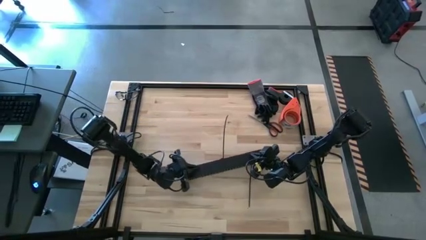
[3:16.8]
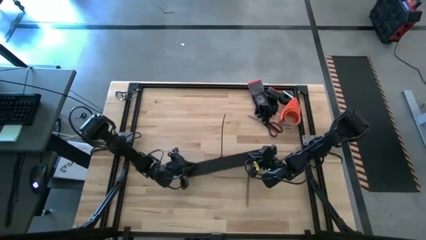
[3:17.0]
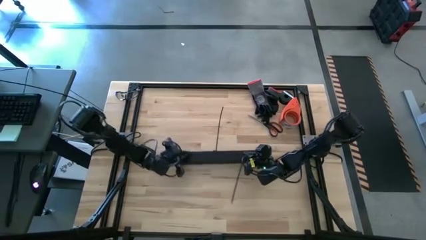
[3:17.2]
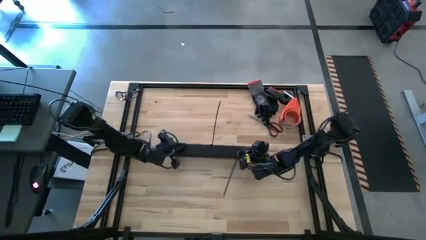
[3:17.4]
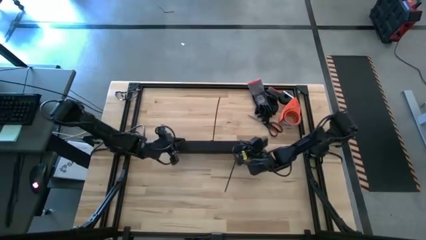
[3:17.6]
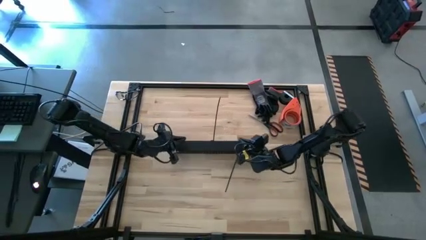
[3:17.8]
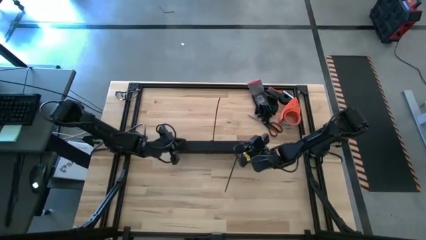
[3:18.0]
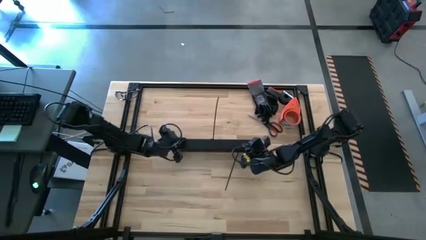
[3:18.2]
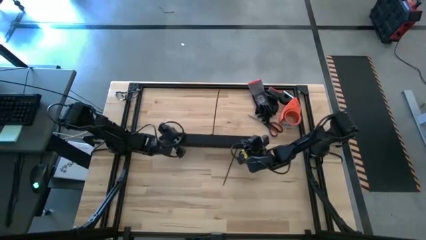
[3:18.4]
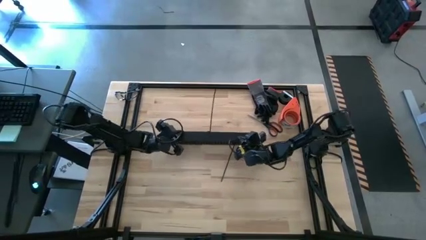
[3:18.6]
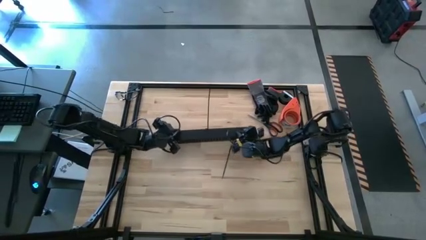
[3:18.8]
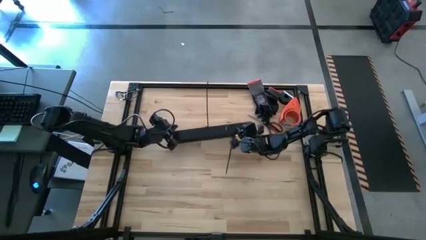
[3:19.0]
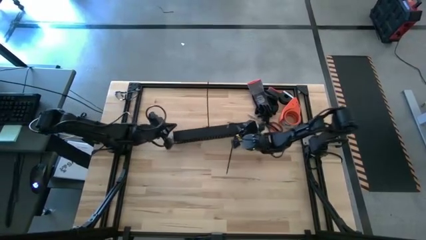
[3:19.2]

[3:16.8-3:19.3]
Task: Ziptie cables
Move the black cable duct to the top center of the table

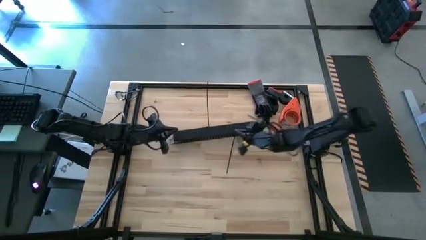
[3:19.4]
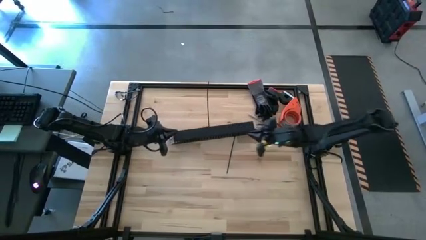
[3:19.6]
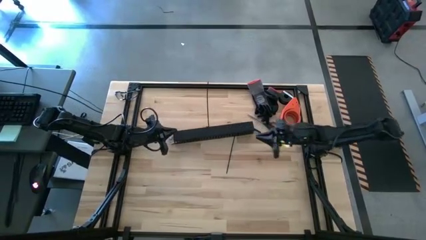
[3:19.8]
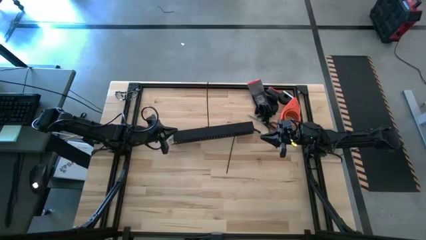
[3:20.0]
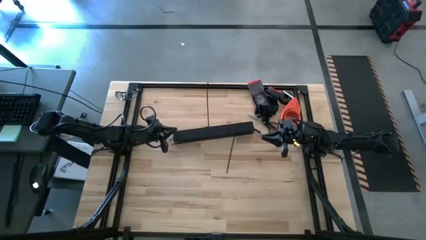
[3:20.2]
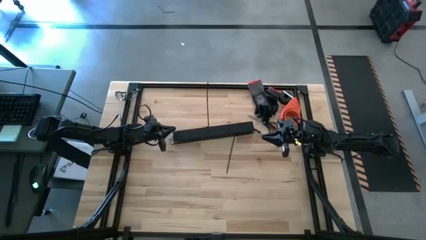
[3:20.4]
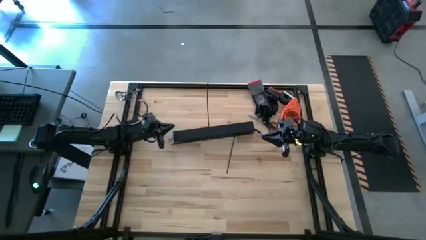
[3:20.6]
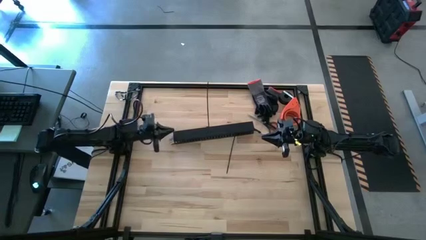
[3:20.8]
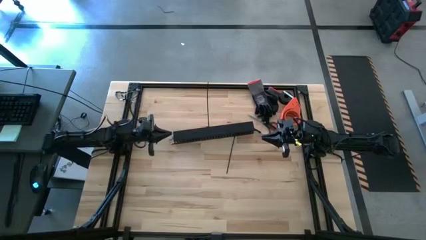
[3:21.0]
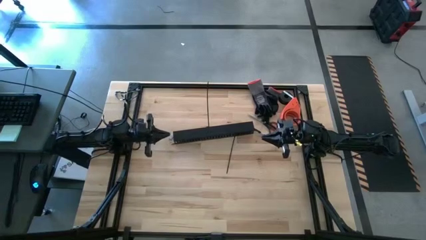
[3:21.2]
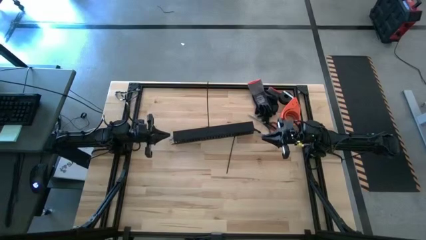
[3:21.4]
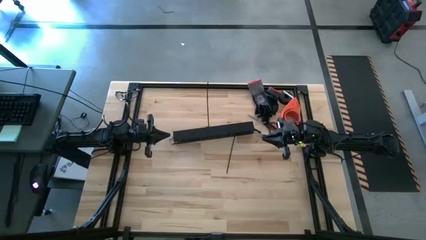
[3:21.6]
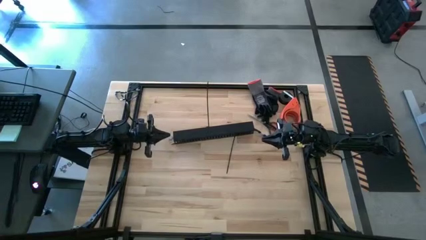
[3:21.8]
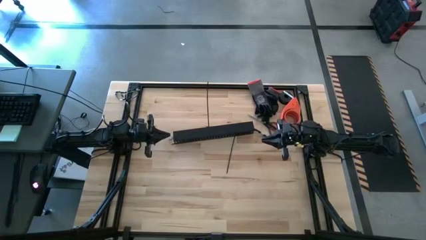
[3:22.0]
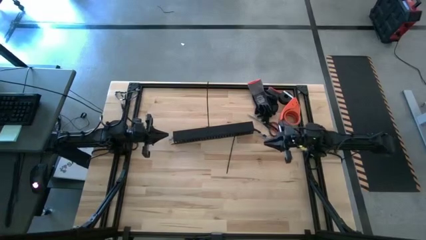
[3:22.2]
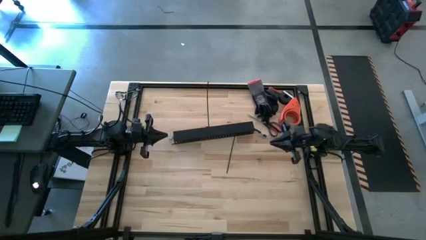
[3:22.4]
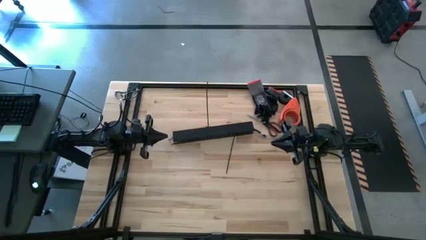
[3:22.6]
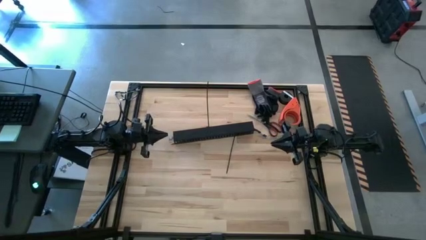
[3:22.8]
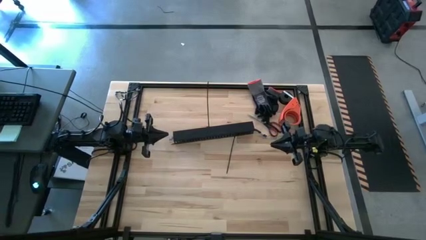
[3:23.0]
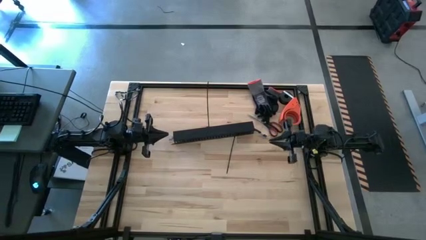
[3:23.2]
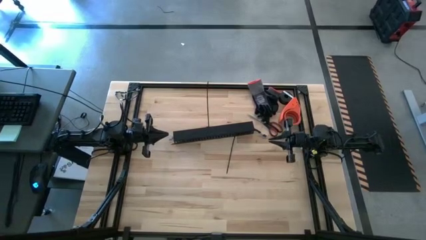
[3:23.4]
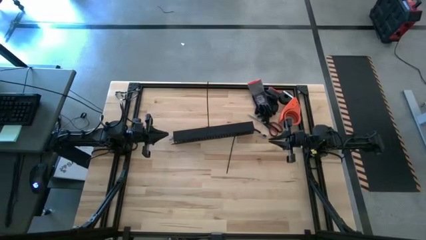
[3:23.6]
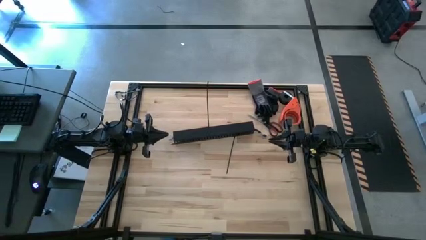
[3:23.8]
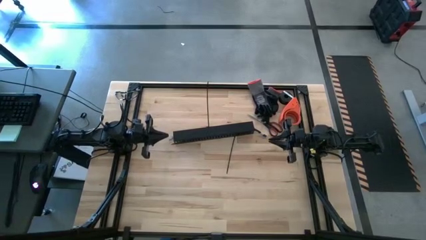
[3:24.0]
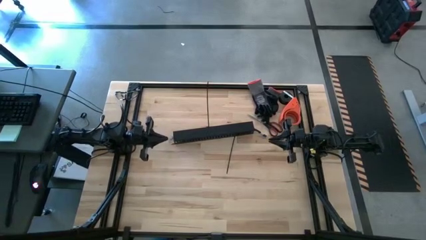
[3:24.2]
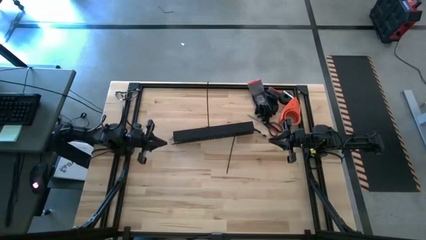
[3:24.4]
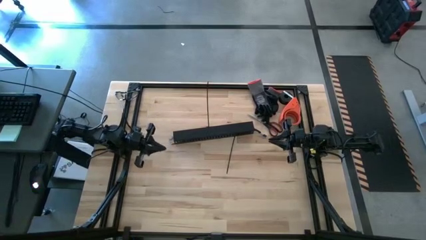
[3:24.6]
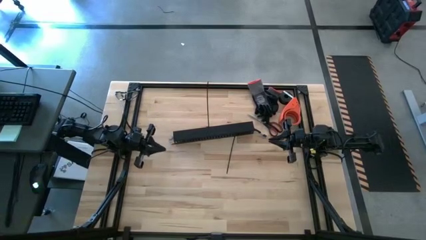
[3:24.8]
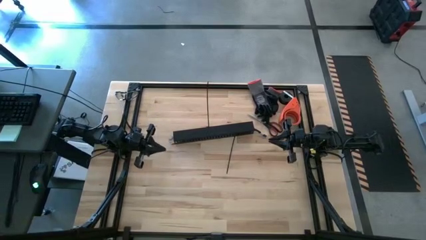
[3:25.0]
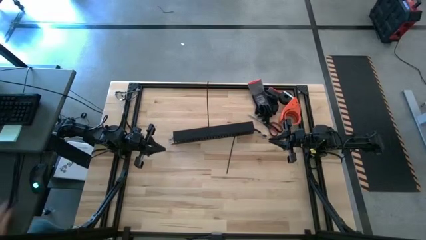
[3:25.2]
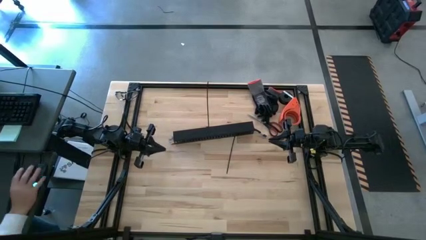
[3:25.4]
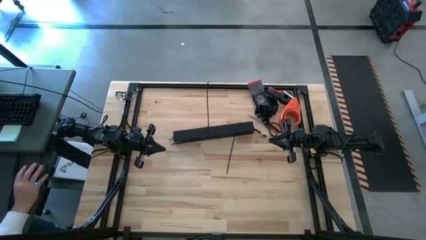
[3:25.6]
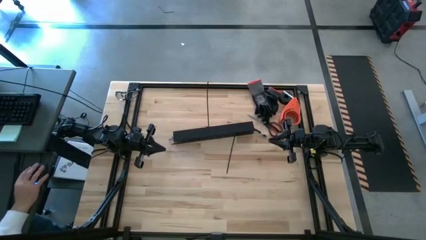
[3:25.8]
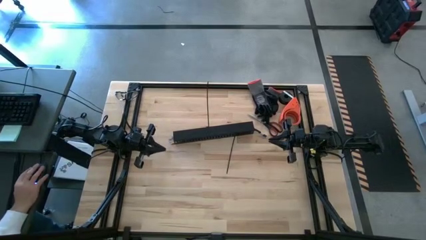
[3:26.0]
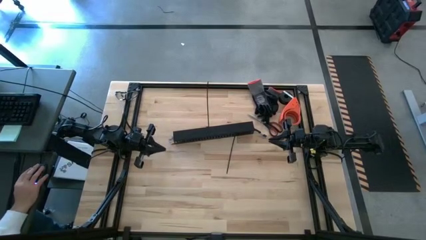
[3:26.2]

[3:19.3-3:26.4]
Return to Home Position

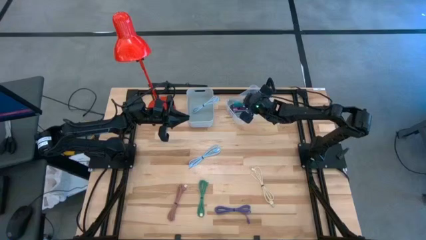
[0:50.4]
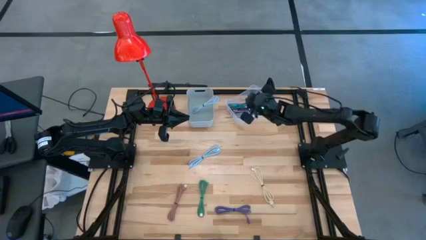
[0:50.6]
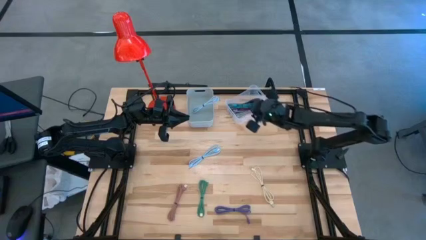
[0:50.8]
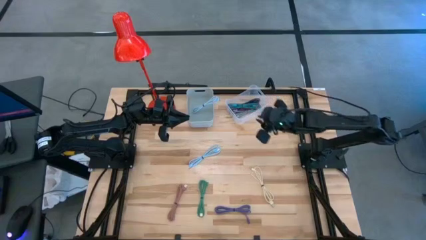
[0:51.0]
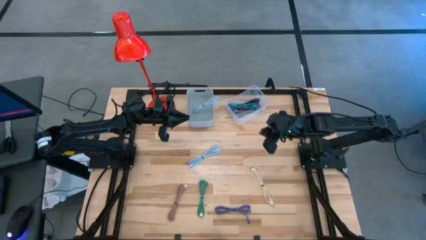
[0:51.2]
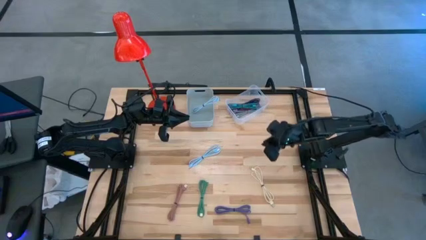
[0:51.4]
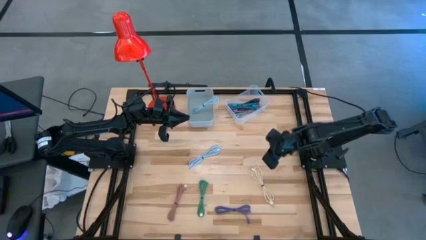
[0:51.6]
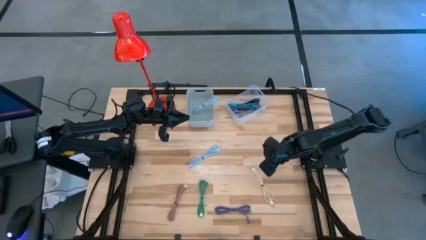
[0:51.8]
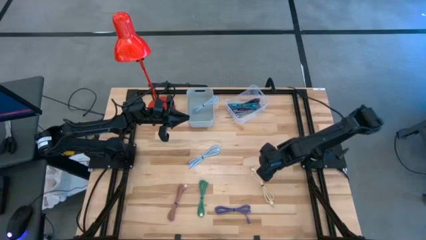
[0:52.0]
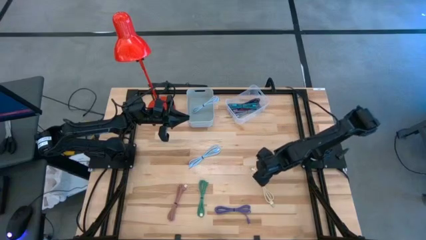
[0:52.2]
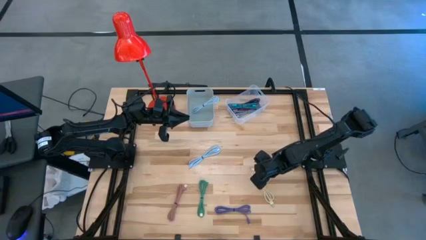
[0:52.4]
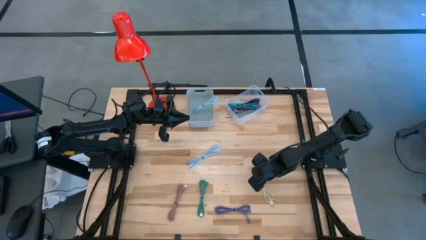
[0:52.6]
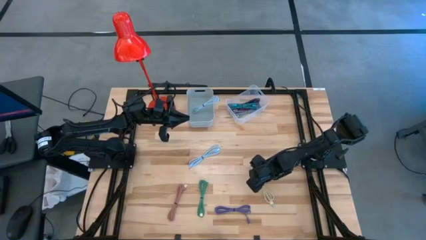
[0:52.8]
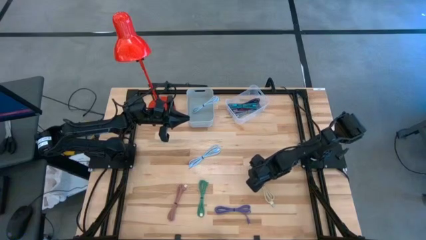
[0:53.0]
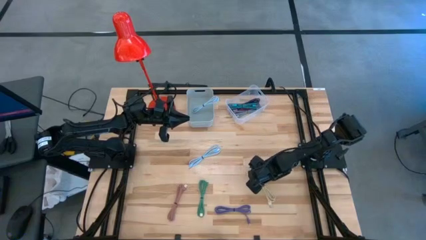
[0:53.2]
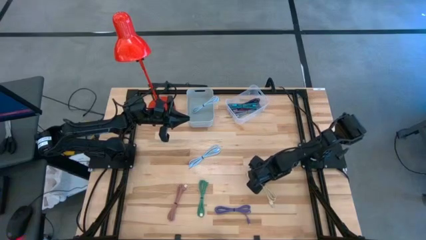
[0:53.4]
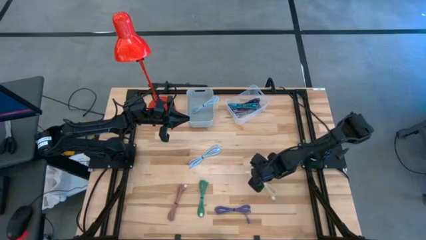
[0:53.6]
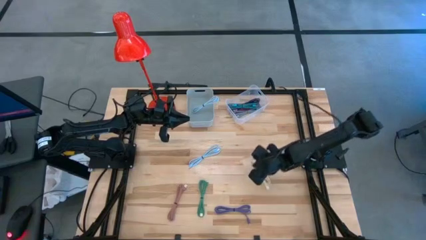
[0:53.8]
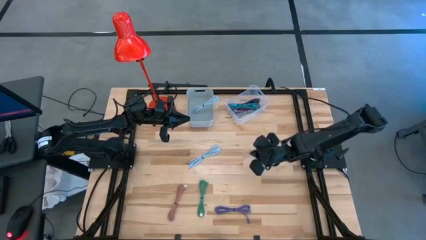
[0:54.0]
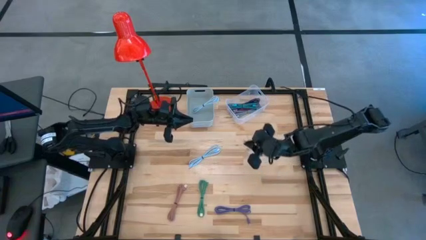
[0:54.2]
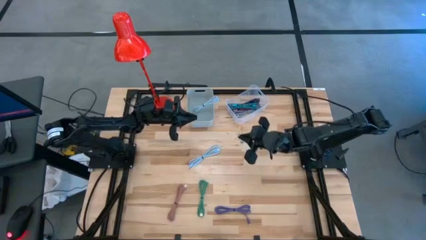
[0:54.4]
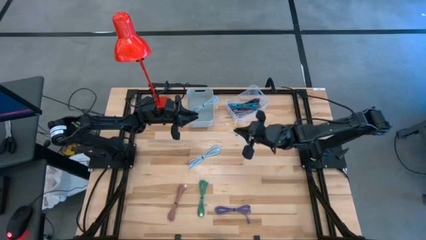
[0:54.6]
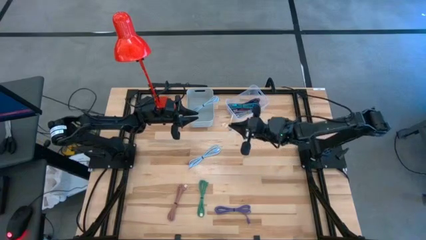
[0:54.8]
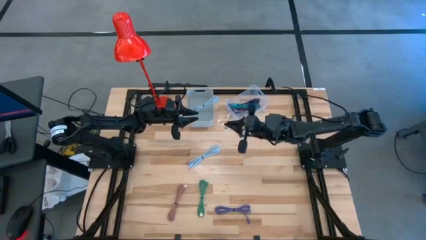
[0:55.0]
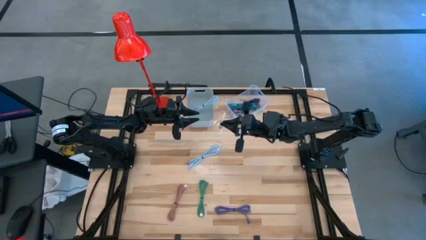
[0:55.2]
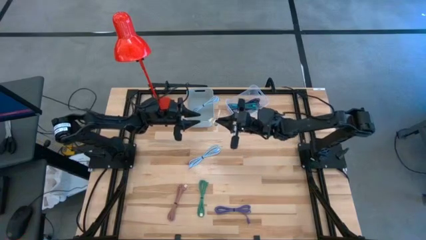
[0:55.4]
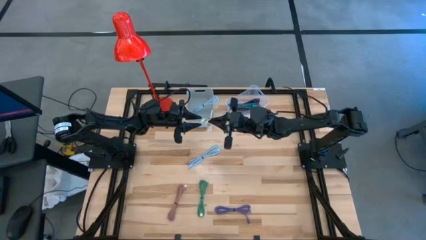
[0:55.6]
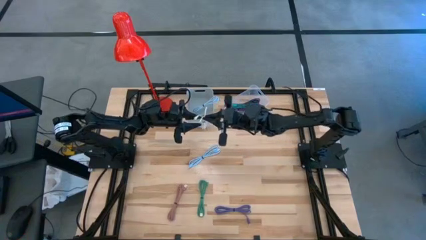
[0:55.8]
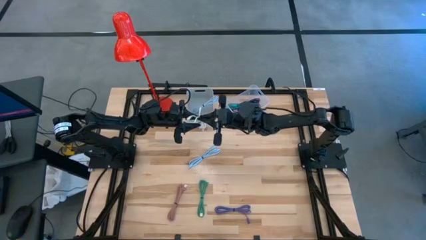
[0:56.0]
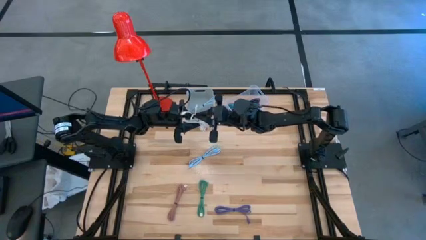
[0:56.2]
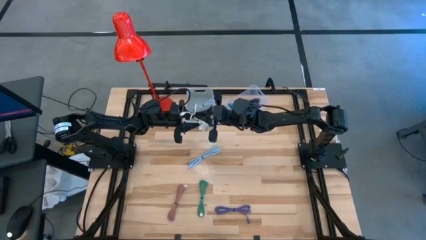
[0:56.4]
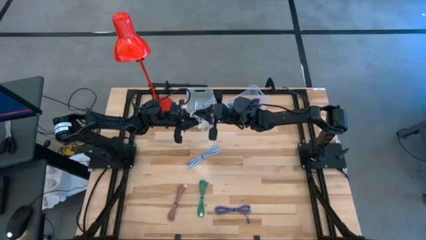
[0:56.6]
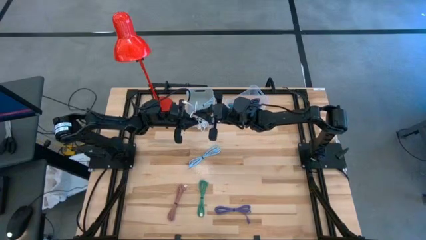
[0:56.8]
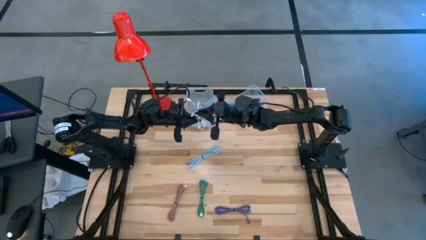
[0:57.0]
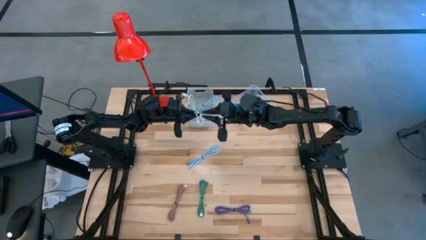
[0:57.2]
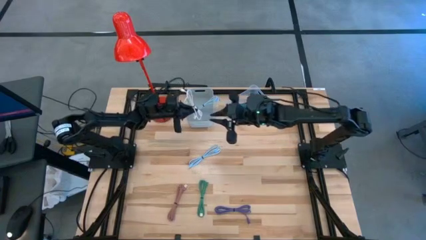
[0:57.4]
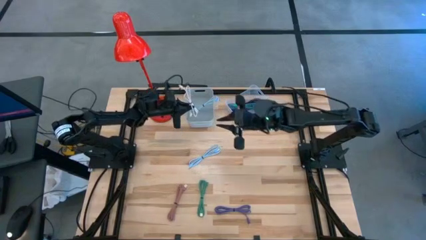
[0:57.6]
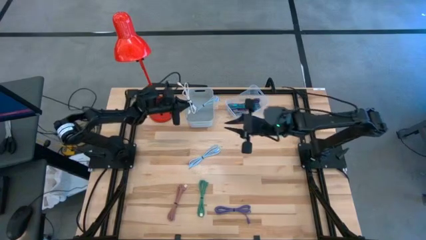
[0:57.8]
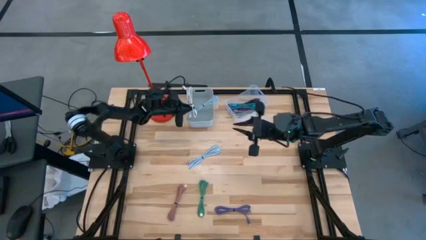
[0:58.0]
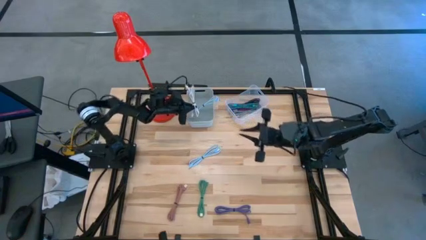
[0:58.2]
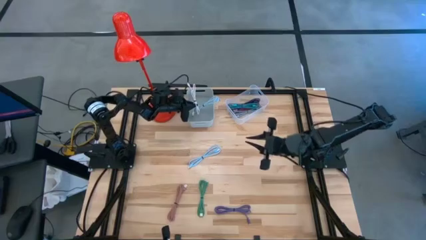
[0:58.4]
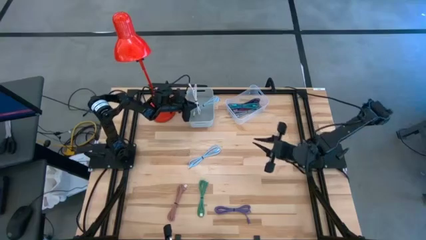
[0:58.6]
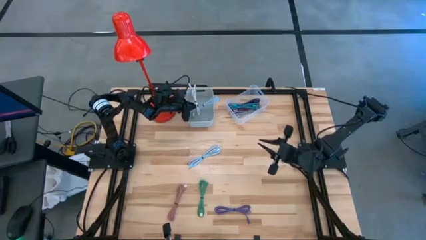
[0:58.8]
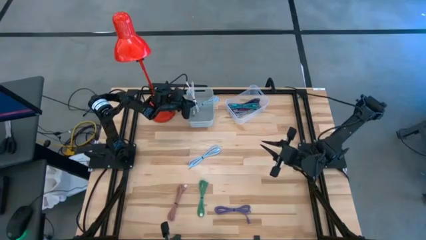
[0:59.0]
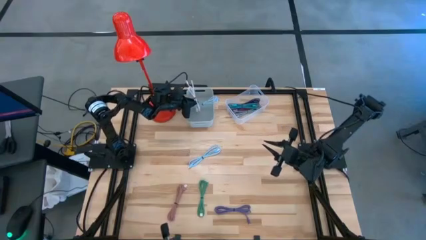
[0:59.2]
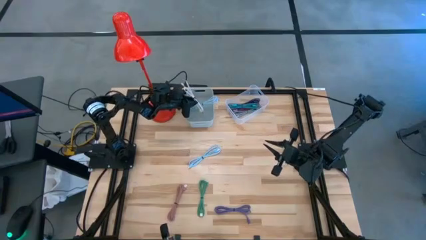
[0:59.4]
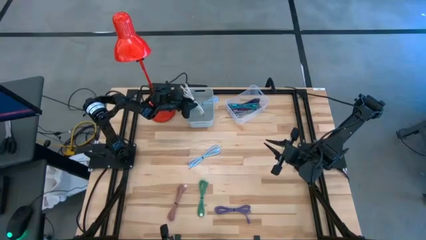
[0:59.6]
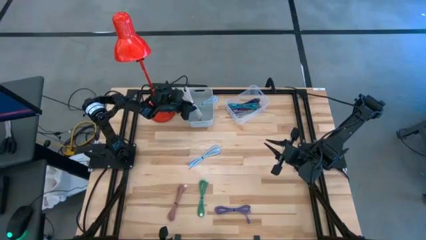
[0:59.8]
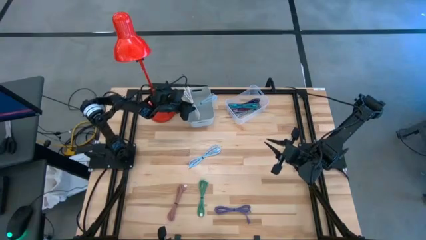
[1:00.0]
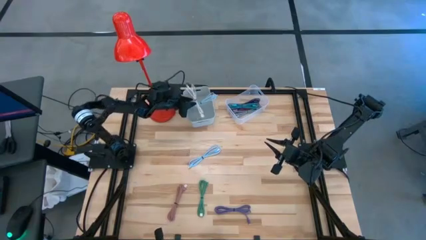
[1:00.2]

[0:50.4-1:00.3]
Task: Pick & Place USB Port
Put the light brown charger cable into the gray bin
